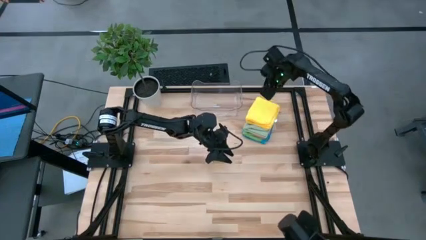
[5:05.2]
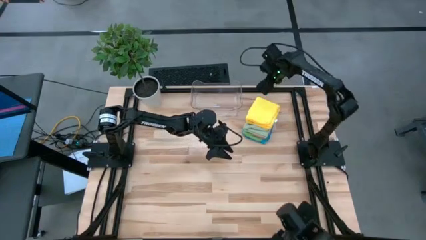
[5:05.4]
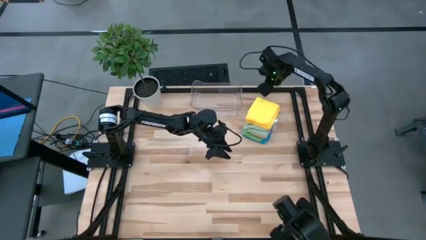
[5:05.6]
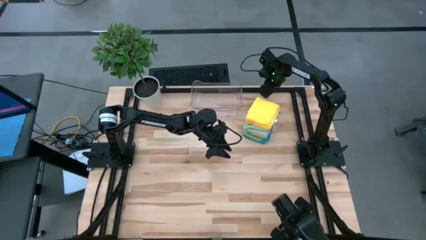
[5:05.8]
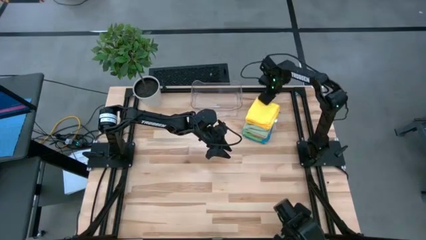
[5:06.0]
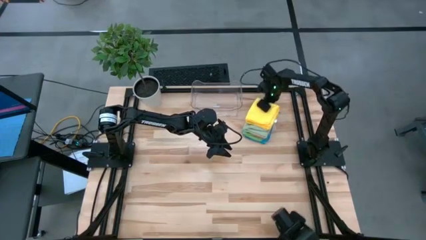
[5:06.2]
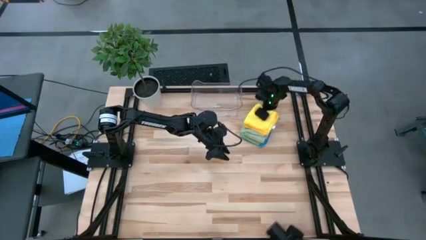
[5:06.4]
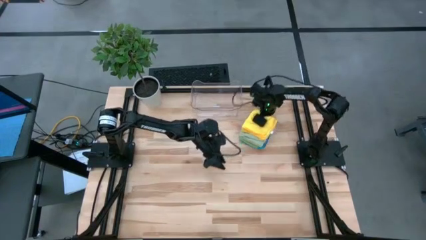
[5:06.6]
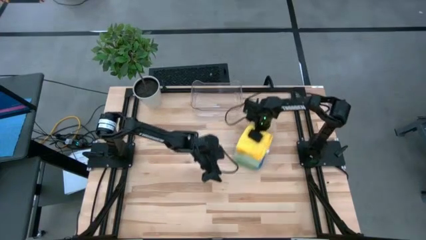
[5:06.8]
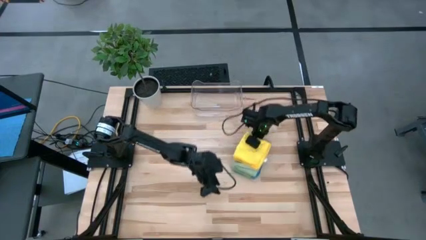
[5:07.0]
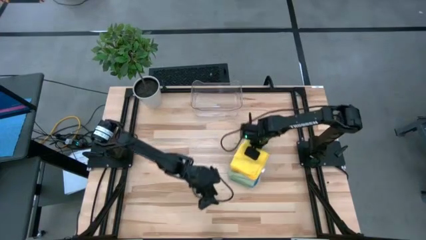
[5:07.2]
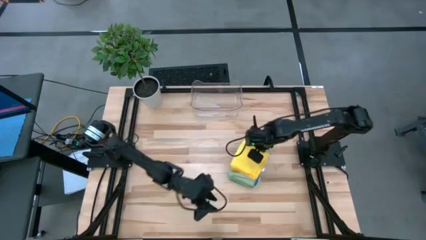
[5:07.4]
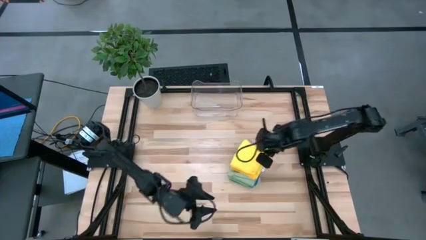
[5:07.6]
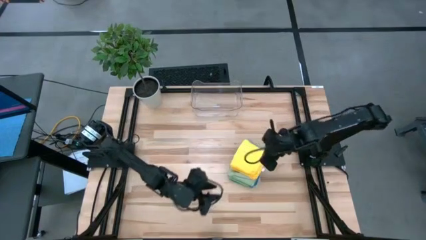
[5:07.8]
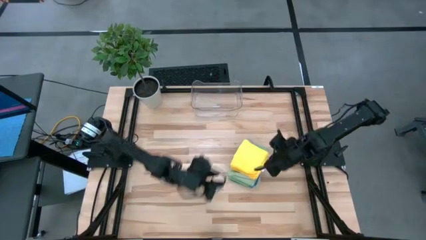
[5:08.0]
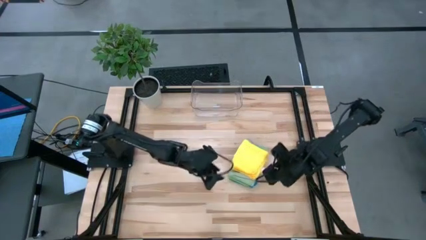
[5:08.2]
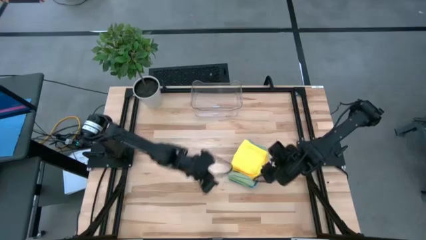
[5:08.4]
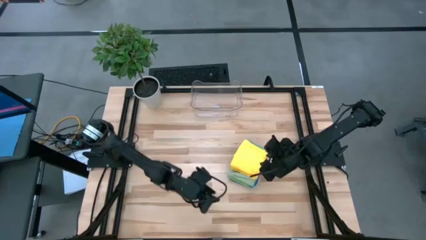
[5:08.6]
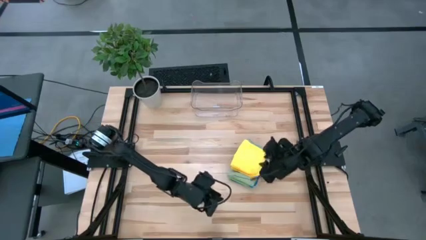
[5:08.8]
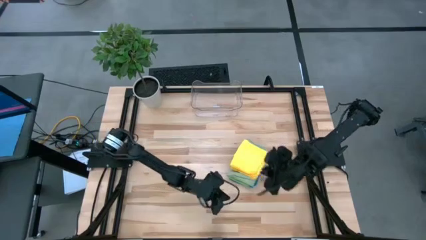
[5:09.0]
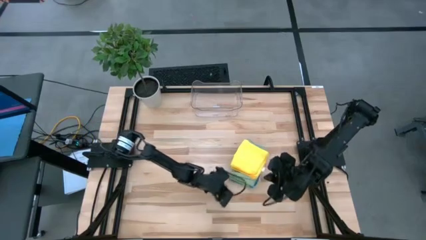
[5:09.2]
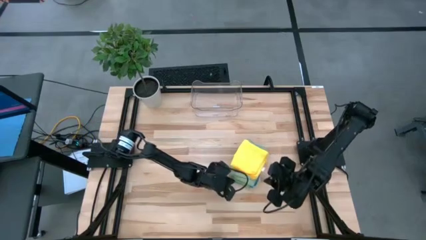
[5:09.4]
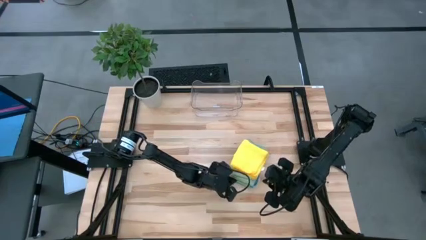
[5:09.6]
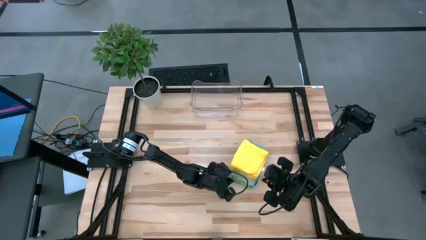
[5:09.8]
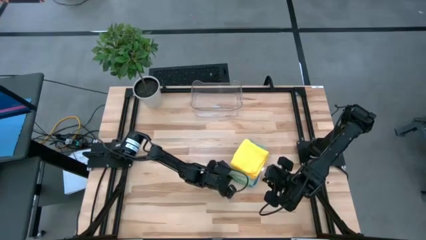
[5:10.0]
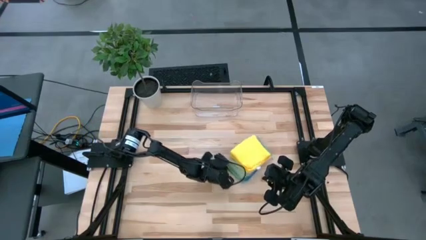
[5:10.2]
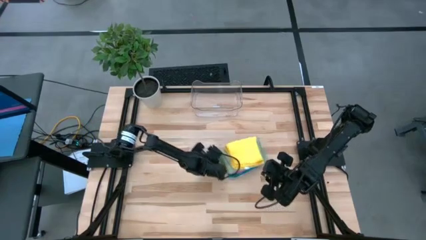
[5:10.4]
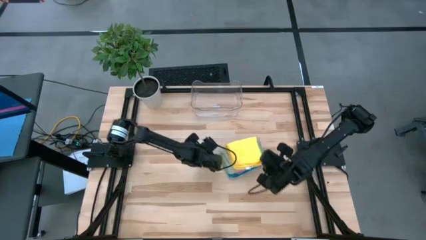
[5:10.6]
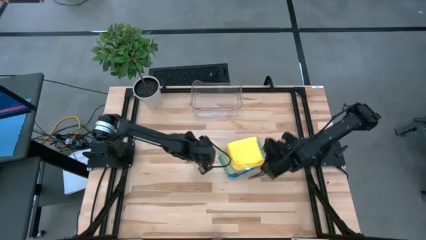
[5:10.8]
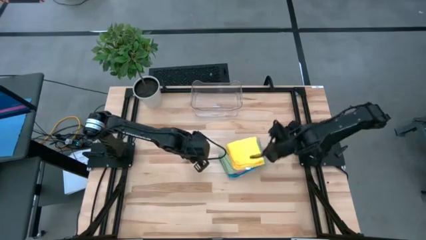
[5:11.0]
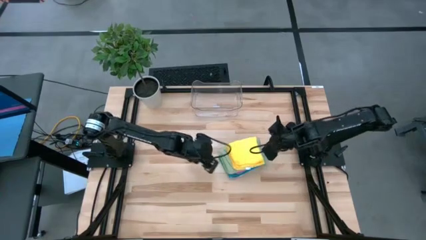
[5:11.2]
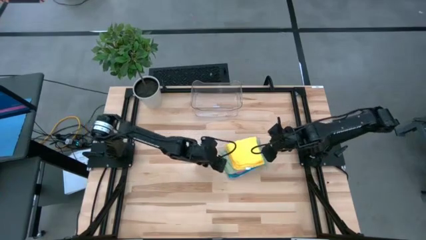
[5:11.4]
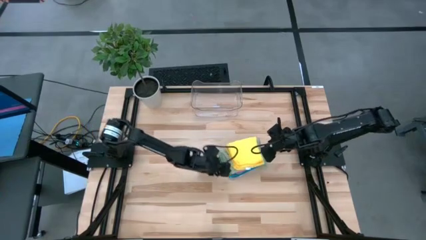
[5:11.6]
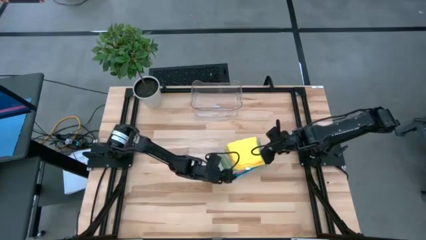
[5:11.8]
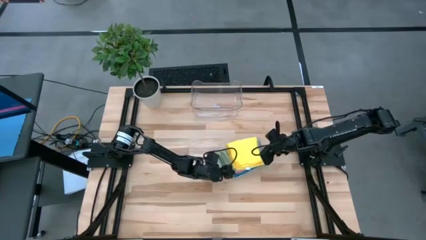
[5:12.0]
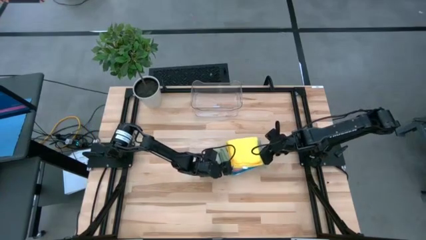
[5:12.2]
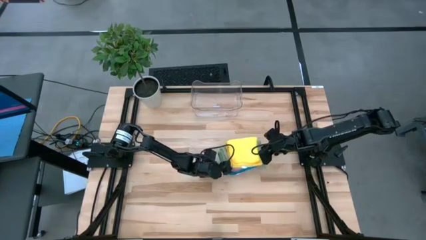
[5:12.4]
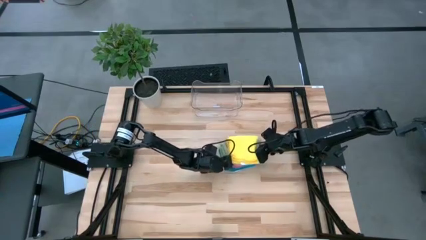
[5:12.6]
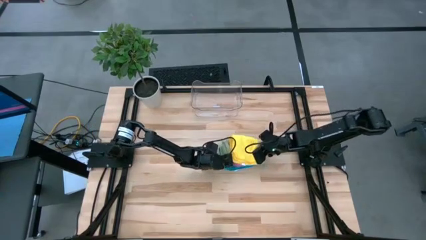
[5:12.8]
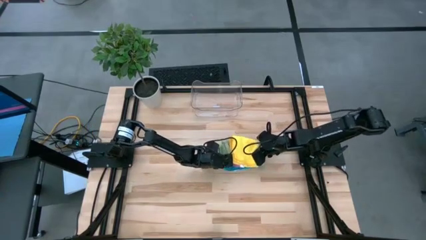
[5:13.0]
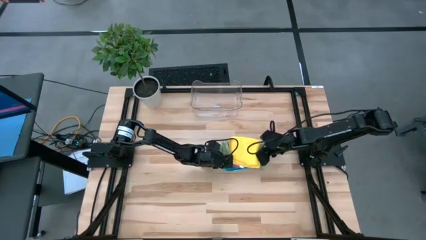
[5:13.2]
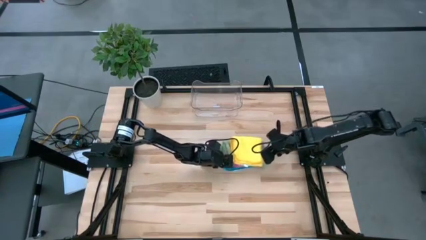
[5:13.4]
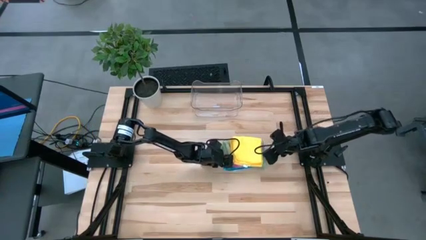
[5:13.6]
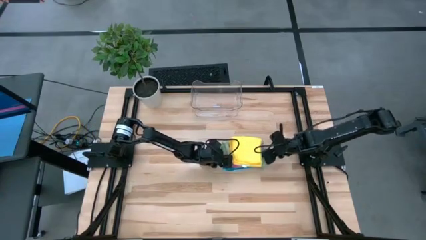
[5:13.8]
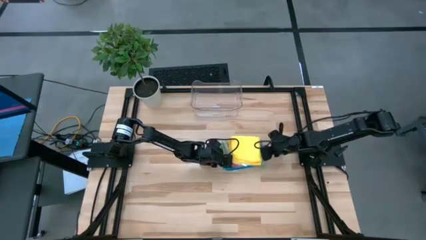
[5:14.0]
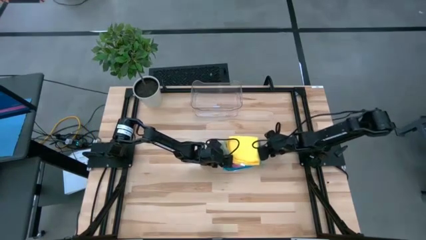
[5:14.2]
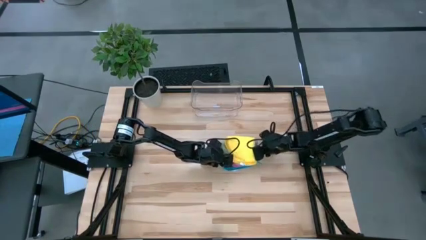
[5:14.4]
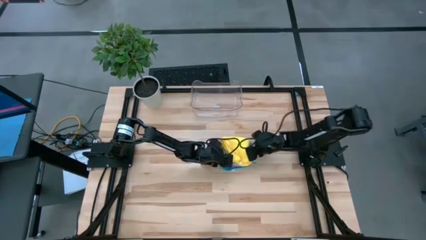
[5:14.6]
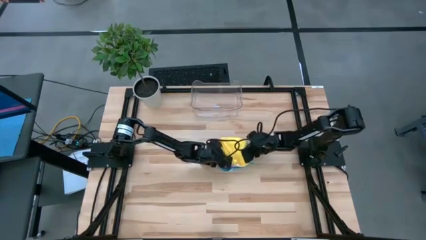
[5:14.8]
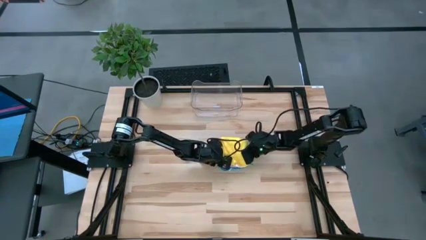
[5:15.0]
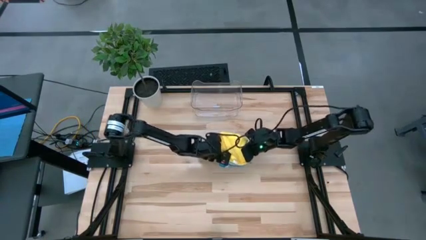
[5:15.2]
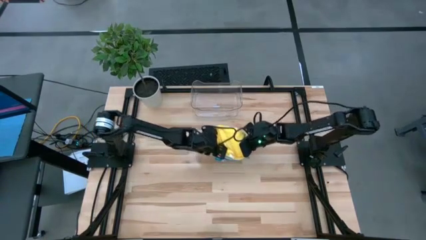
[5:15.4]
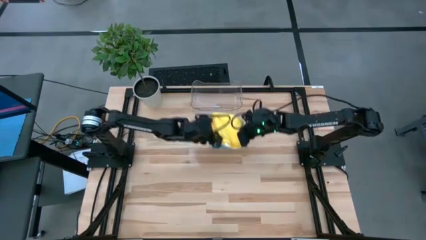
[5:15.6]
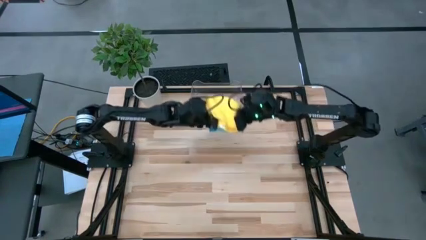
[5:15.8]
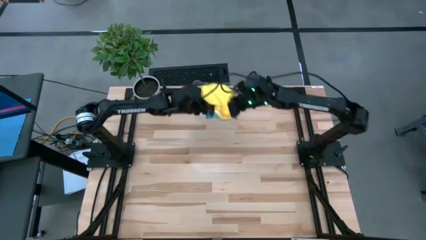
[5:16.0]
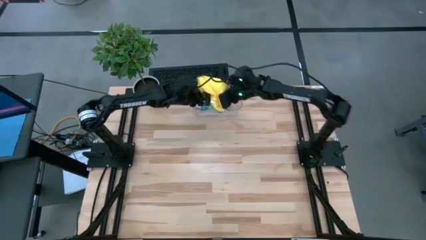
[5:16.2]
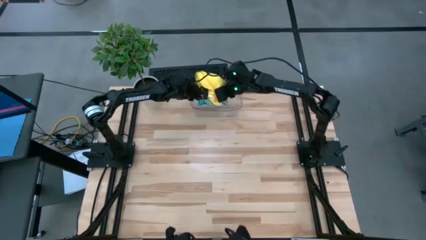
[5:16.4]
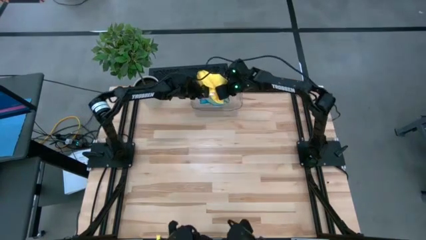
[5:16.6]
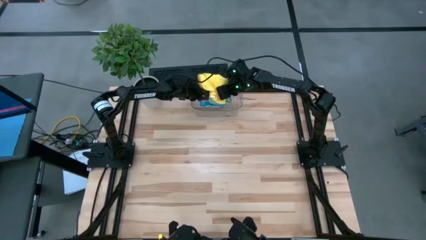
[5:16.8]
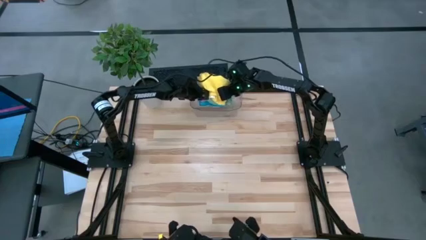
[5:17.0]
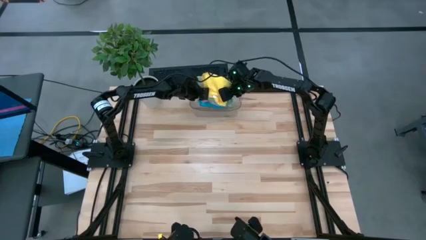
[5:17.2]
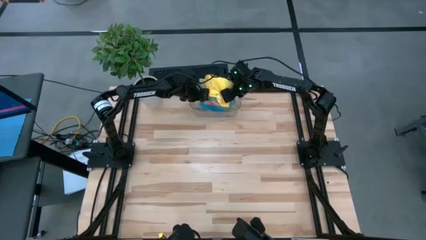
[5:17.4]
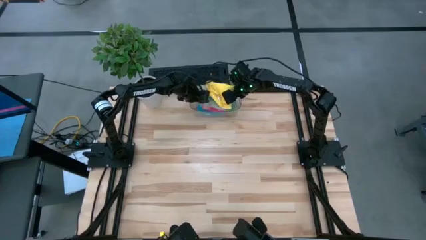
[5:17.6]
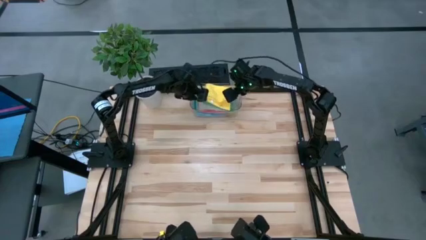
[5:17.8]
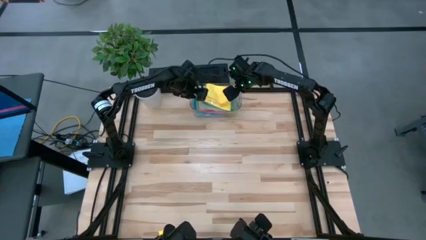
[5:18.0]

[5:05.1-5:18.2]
Task: Fold microfiber towels
Put the folded stacked microfiber towels into the transparent bin

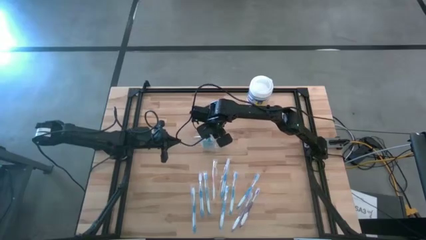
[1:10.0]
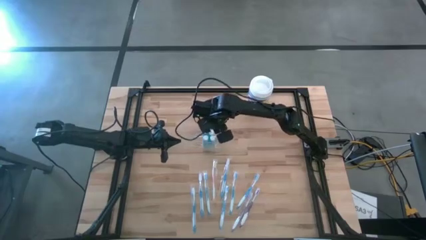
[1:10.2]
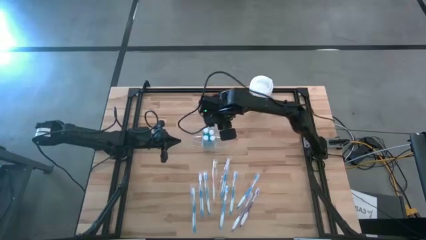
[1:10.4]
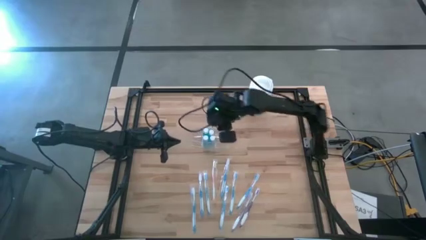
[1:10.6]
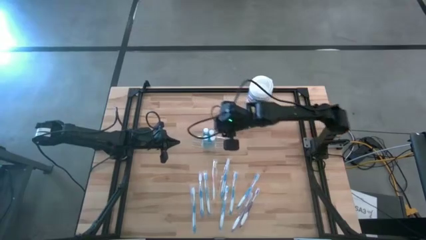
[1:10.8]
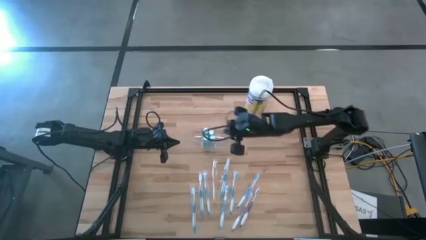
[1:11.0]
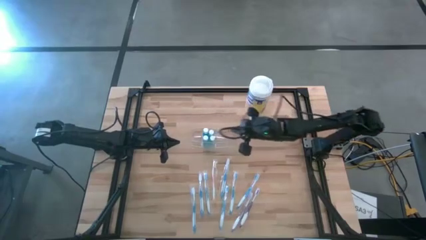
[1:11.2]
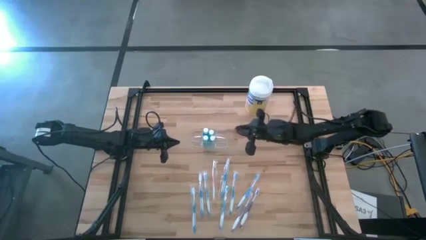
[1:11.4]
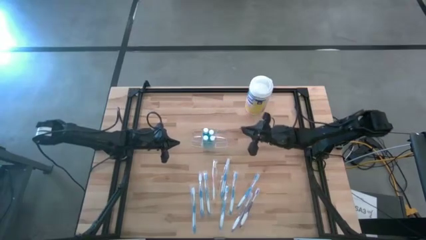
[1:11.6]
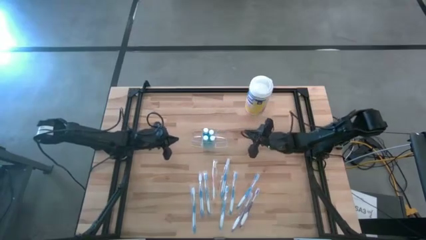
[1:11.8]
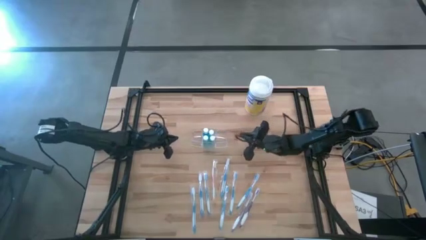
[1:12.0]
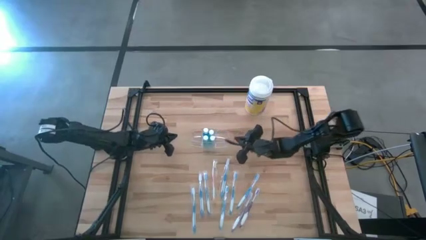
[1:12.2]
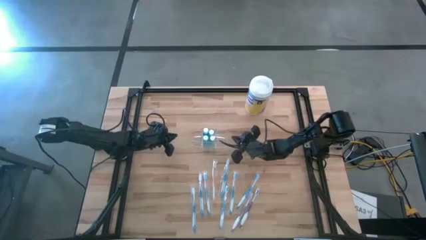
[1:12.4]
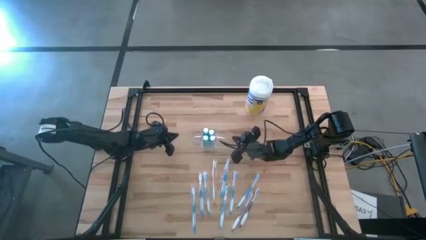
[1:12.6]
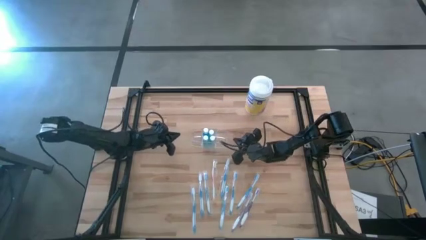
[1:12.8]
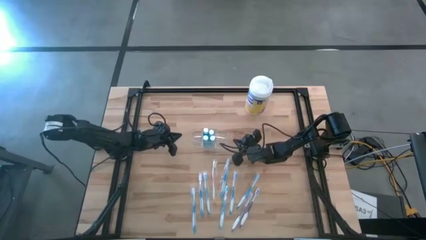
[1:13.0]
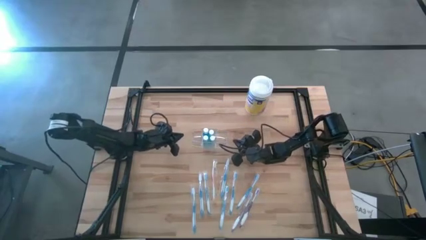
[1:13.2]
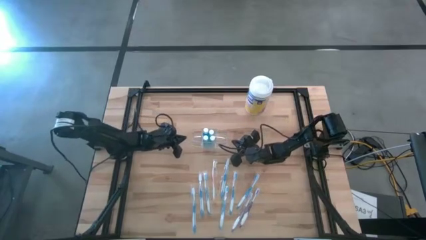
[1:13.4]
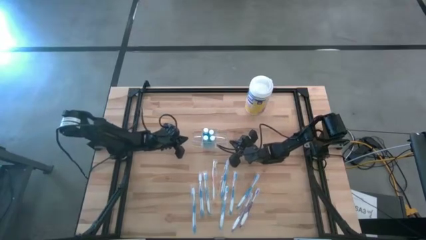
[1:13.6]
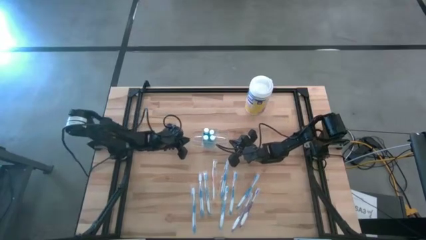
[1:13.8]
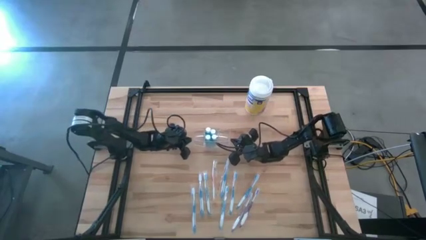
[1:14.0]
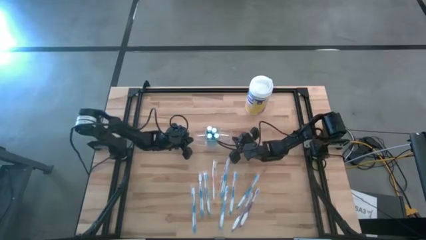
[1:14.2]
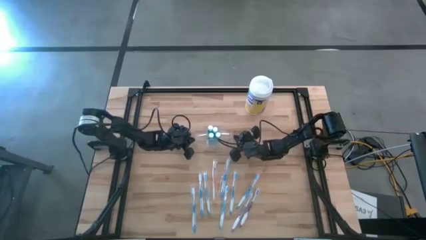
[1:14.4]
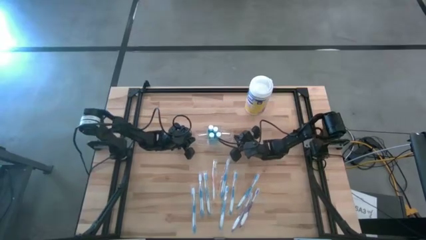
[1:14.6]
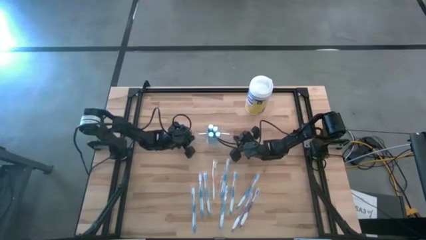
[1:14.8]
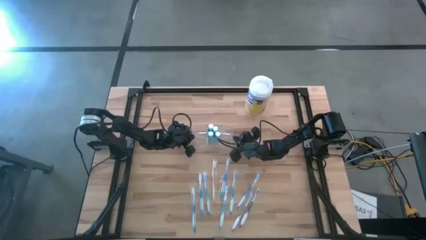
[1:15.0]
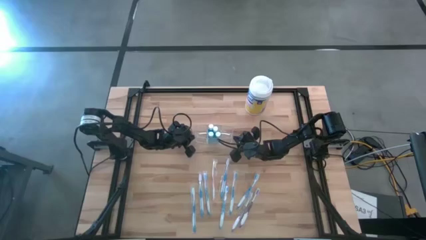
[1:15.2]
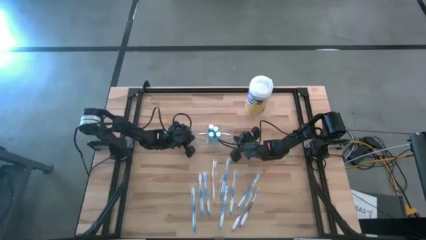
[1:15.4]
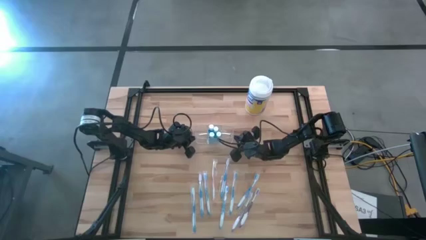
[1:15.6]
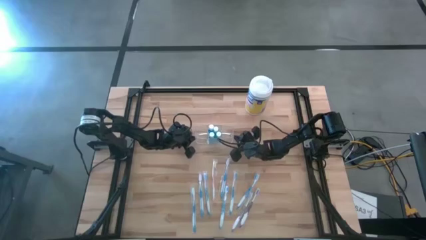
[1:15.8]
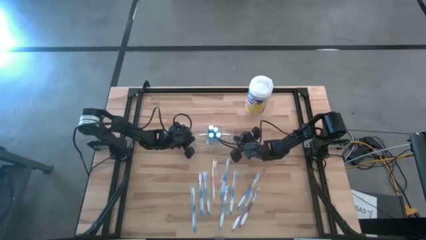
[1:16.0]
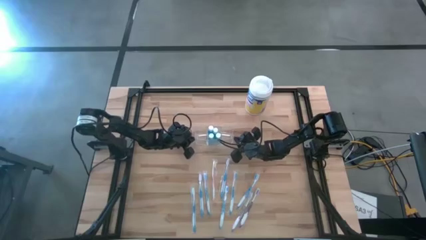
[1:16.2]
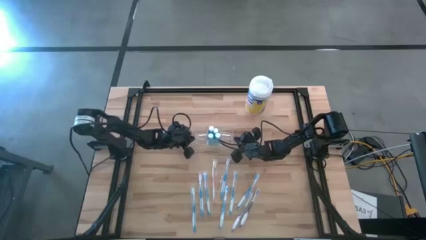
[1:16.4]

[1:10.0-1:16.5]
Task: Pick & Place toothbrushing station
Adjust the transparent organizer
